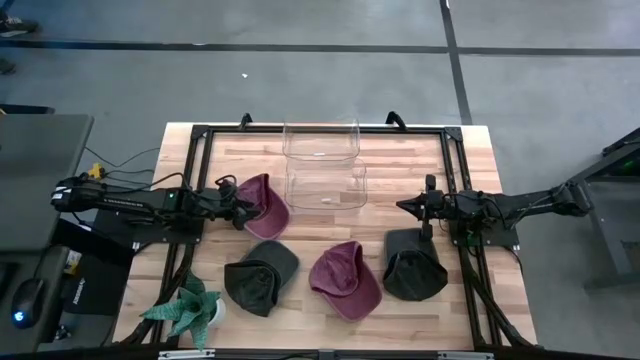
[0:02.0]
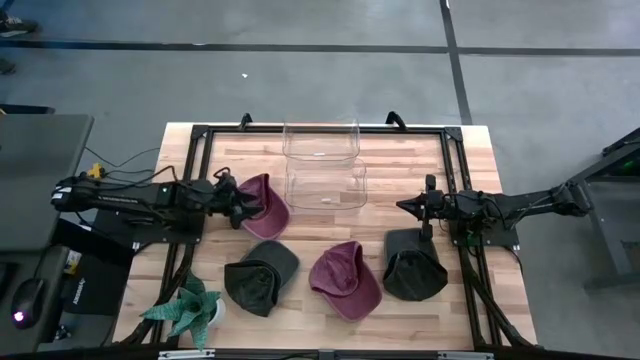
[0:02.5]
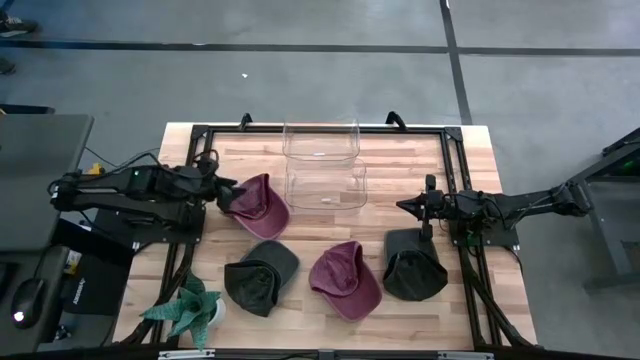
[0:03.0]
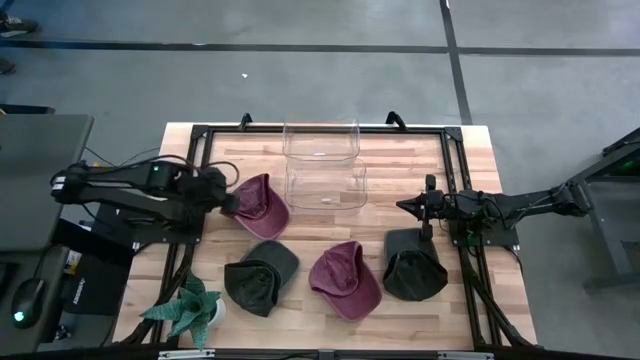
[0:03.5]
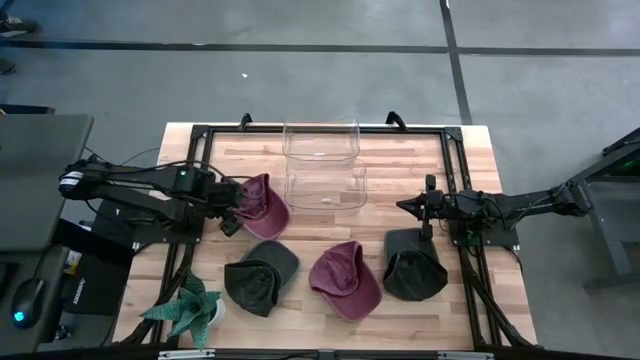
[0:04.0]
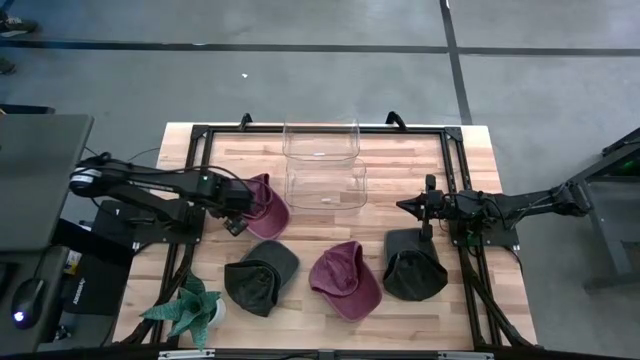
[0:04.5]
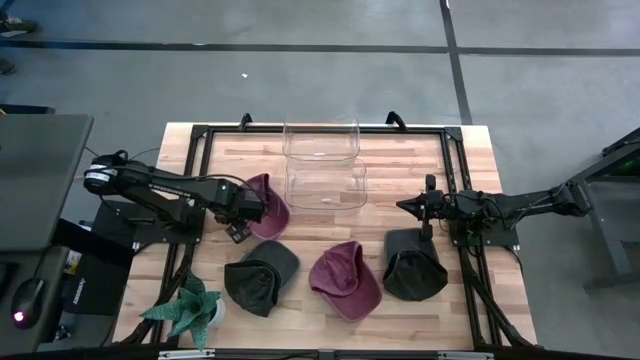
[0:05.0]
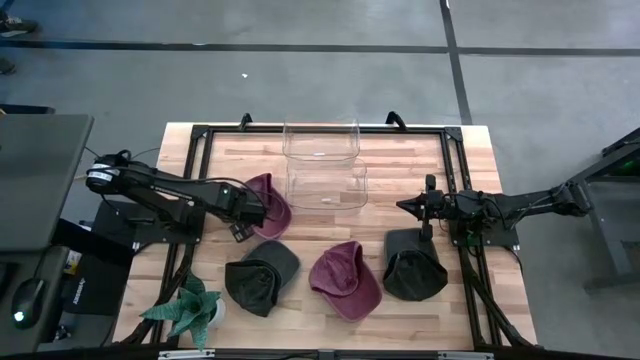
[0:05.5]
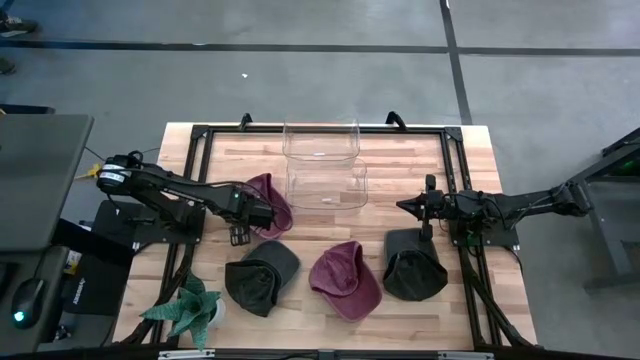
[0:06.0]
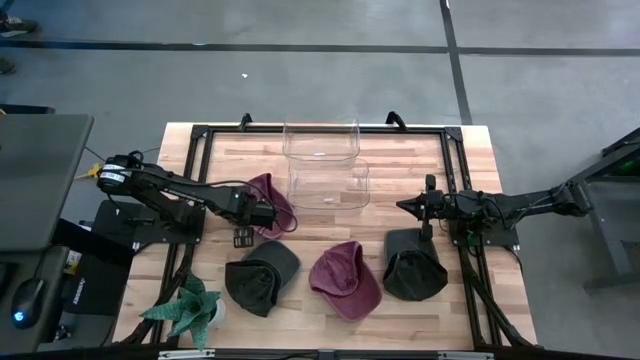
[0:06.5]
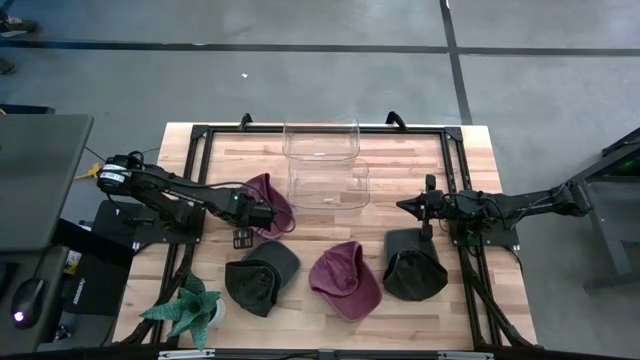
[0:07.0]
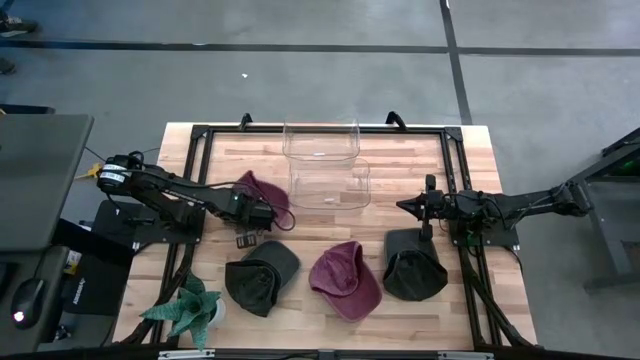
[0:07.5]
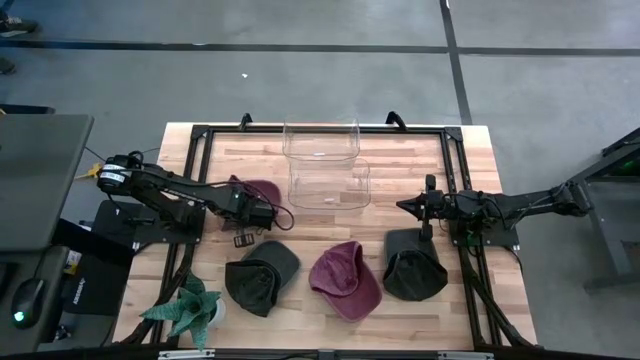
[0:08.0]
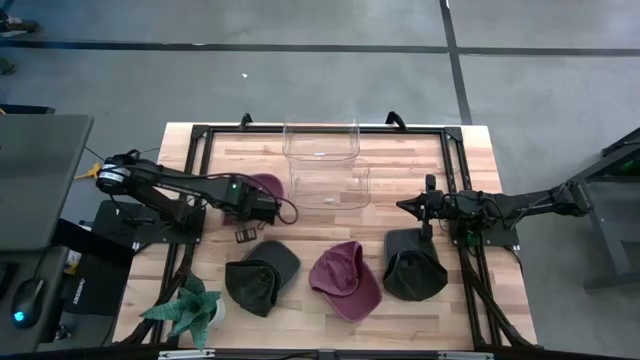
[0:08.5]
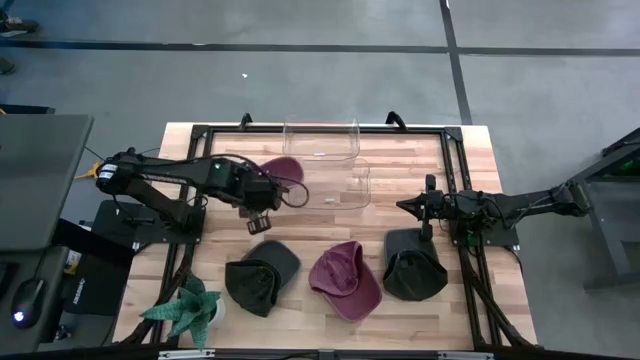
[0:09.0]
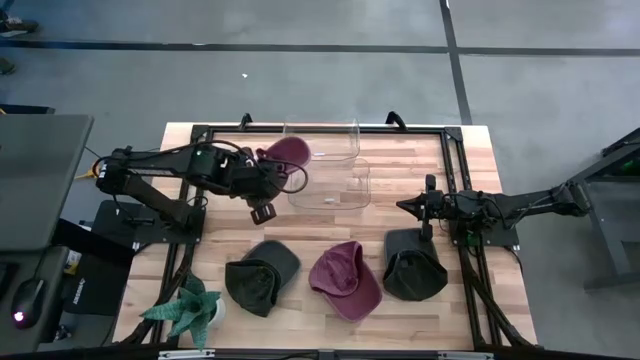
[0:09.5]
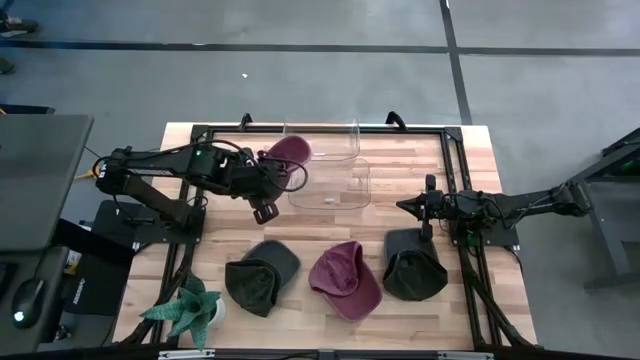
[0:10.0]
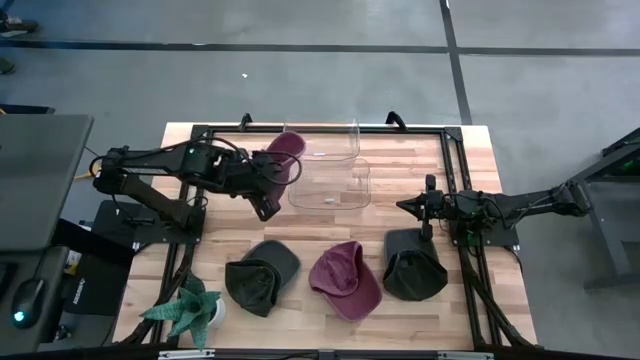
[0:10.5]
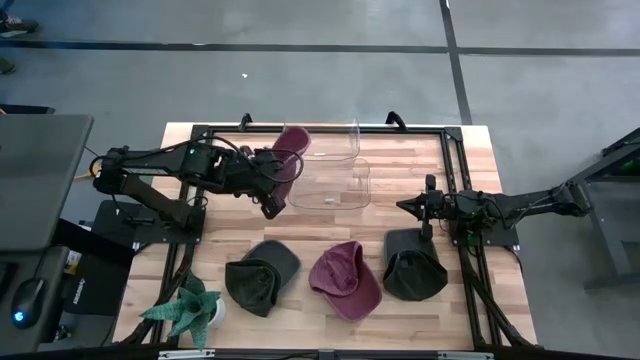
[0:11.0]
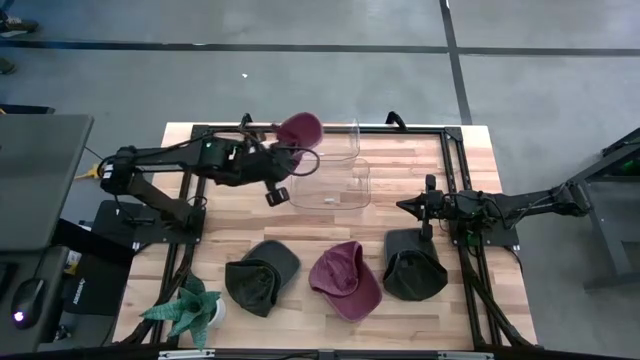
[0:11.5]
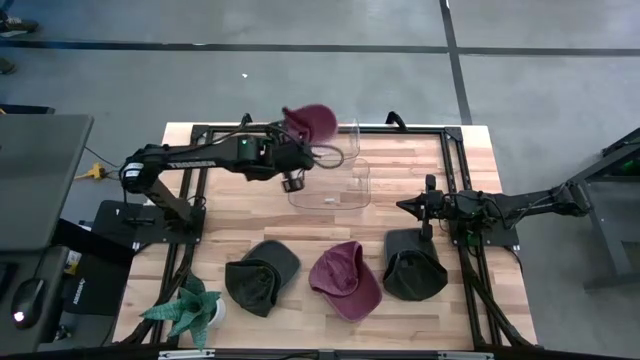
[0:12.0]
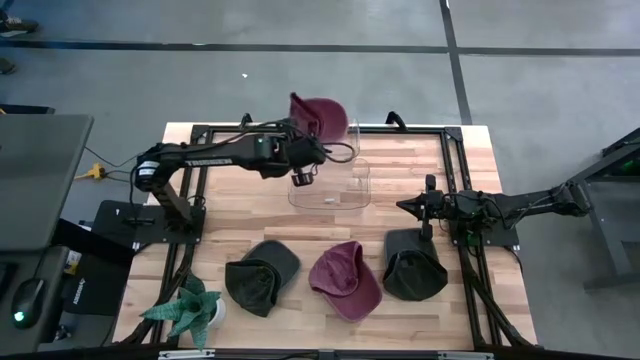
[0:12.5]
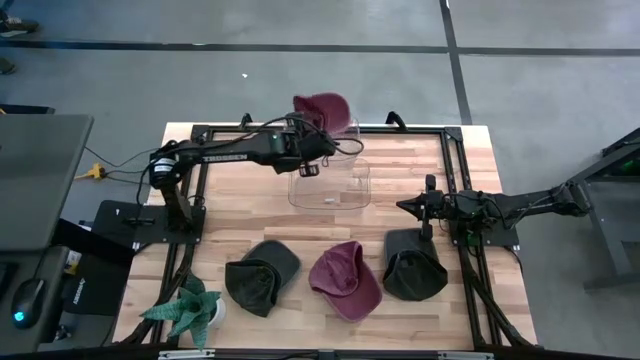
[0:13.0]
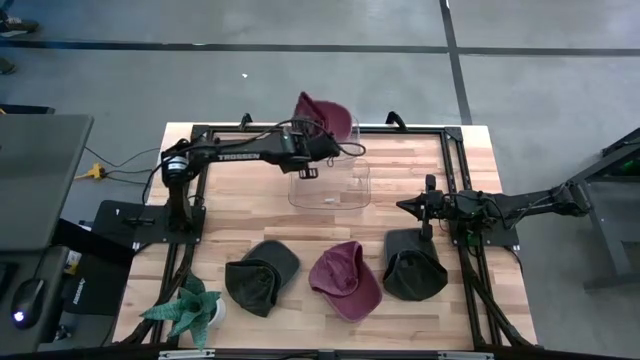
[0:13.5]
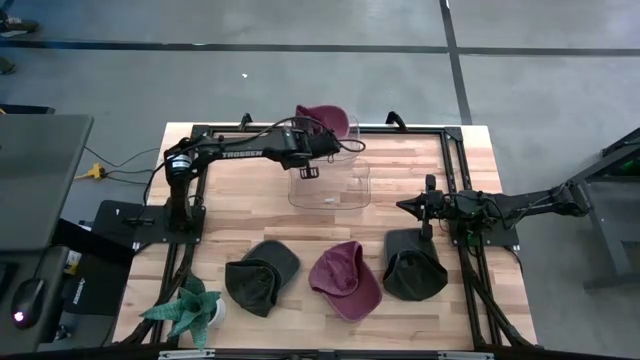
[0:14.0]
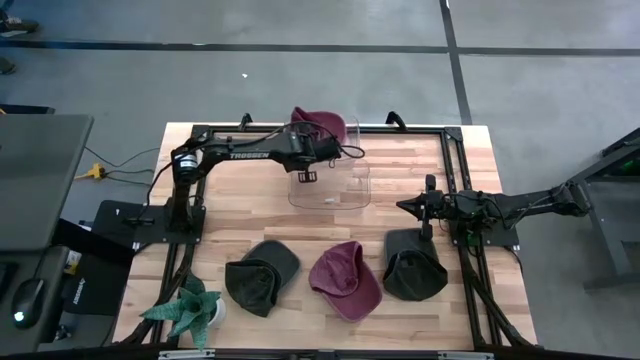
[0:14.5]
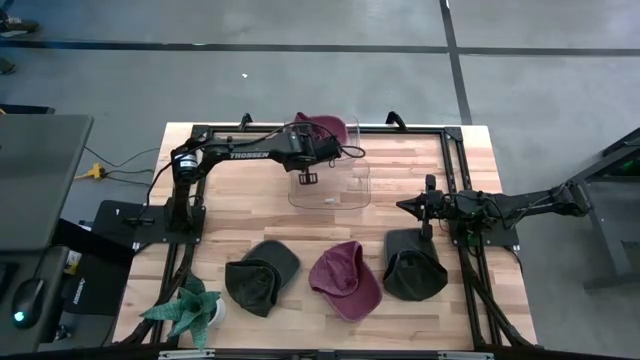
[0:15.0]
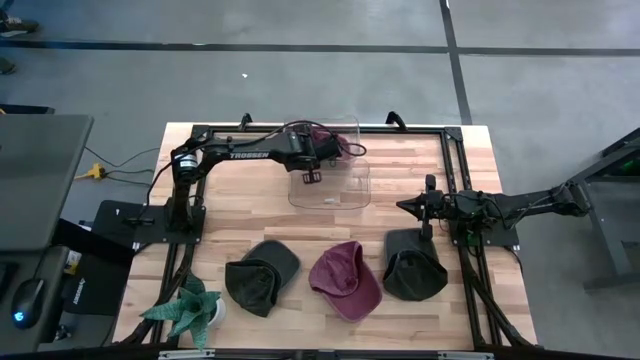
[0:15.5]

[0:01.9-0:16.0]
Task: Pick & Place hat
Put the dark red cap into the top transparent bin

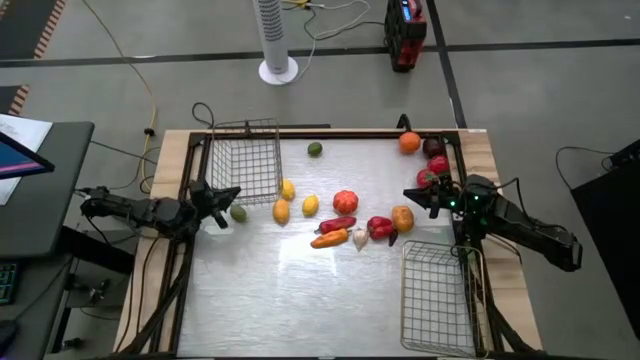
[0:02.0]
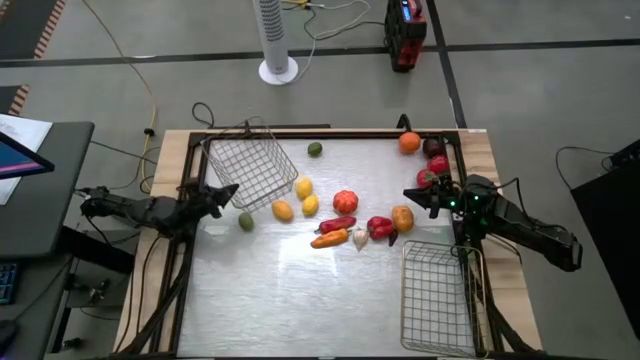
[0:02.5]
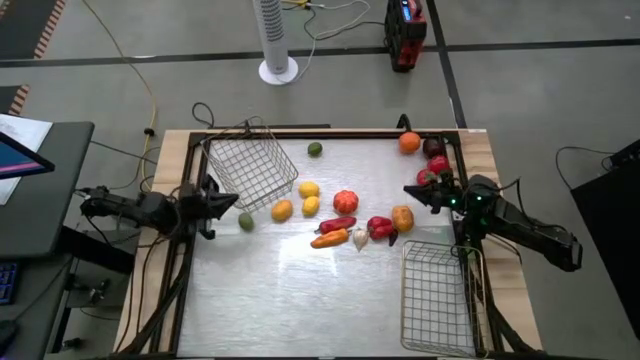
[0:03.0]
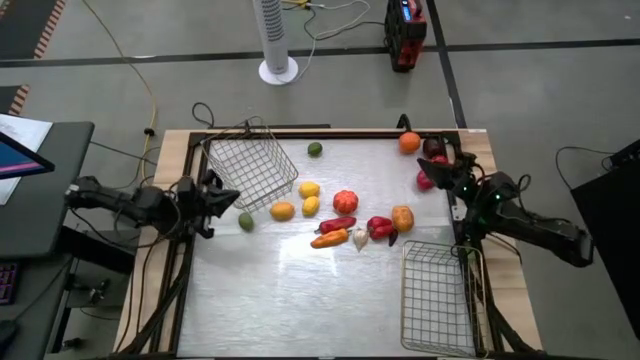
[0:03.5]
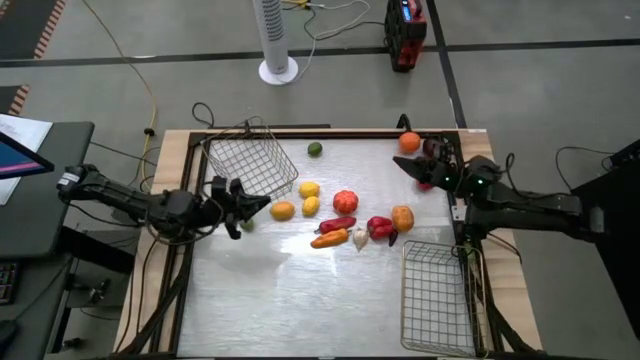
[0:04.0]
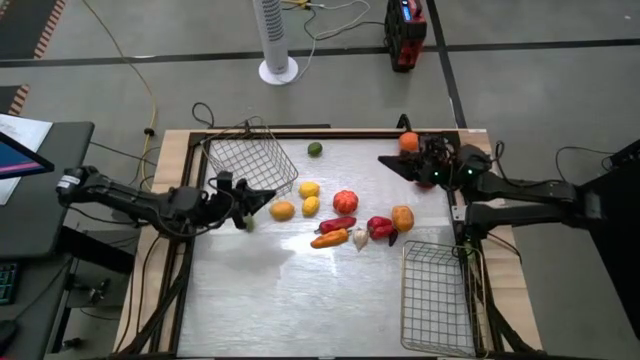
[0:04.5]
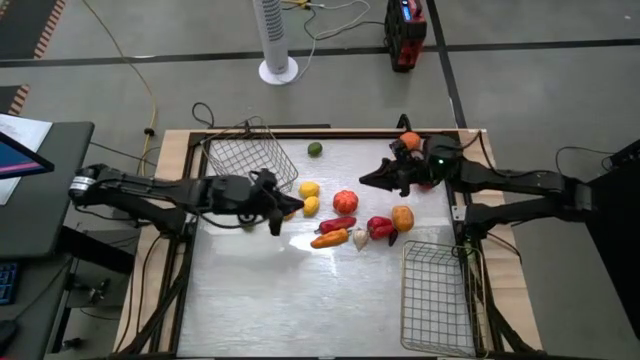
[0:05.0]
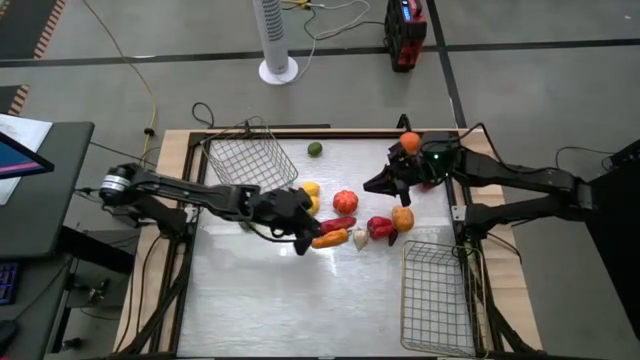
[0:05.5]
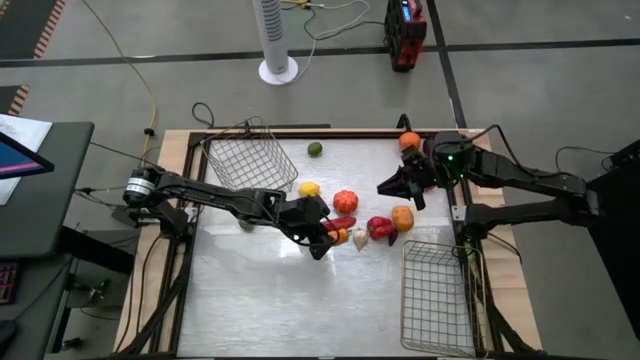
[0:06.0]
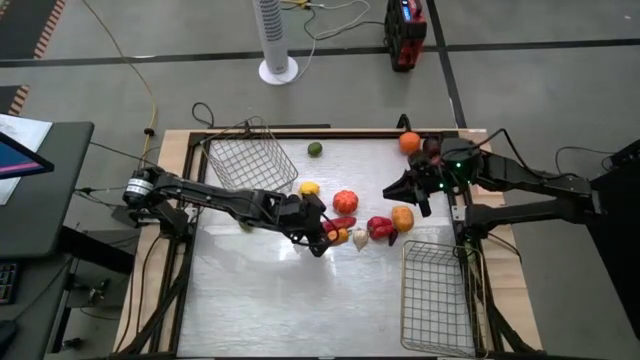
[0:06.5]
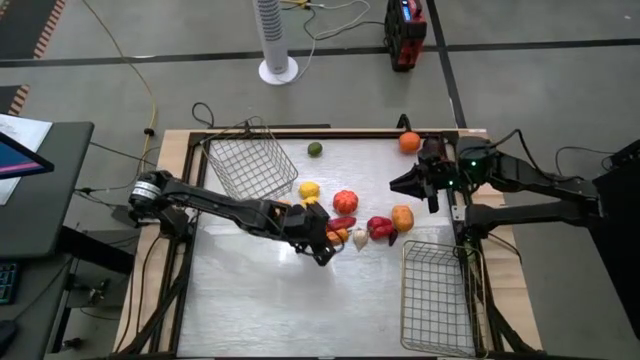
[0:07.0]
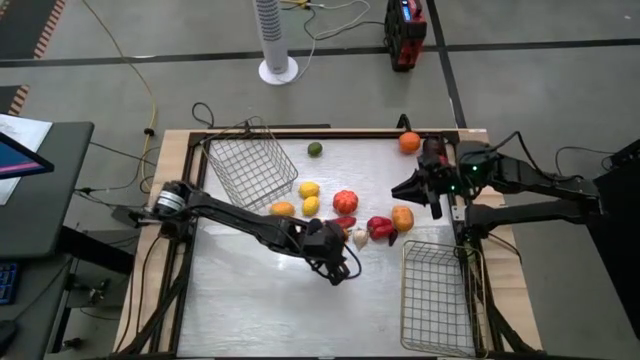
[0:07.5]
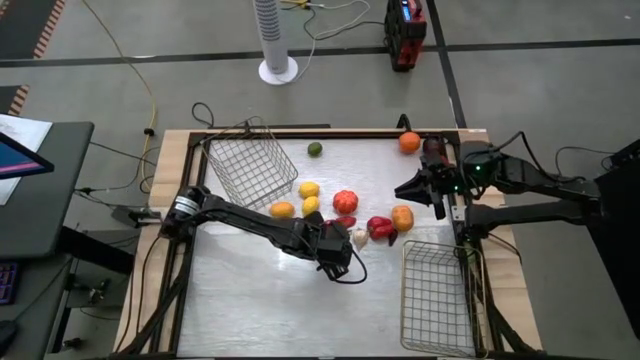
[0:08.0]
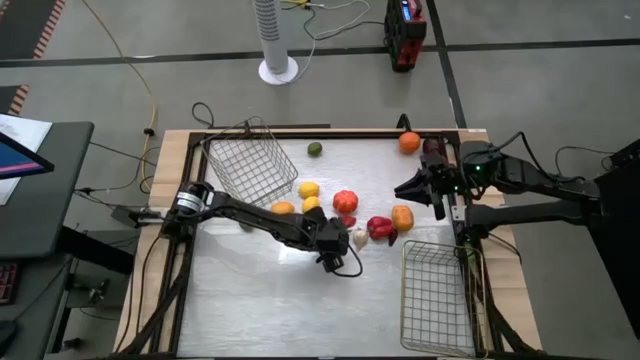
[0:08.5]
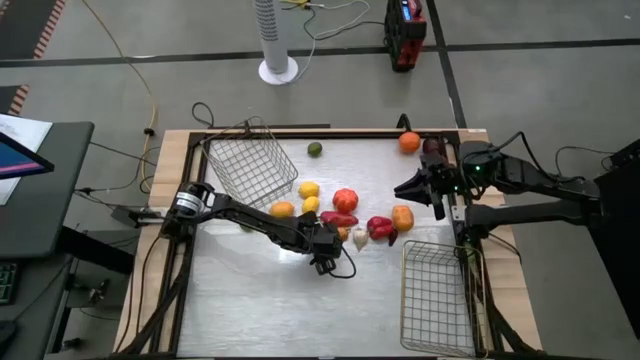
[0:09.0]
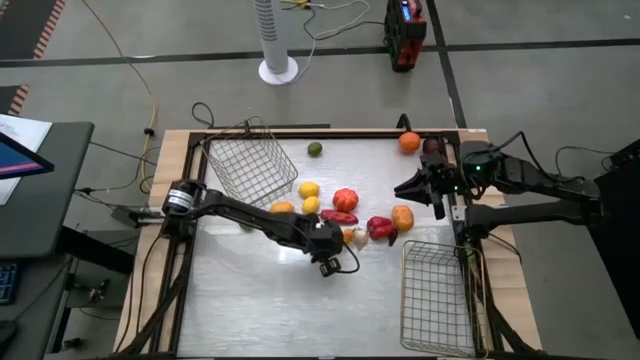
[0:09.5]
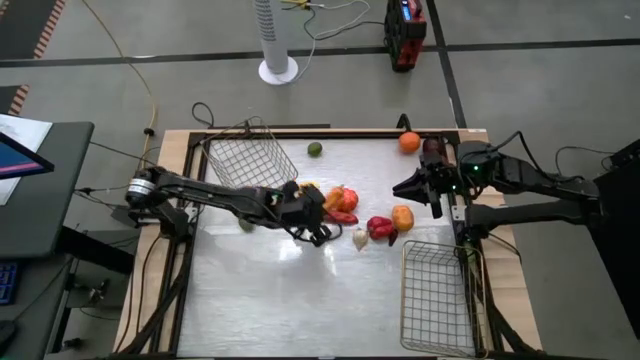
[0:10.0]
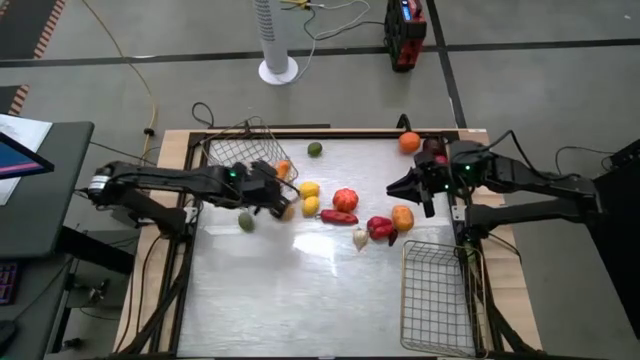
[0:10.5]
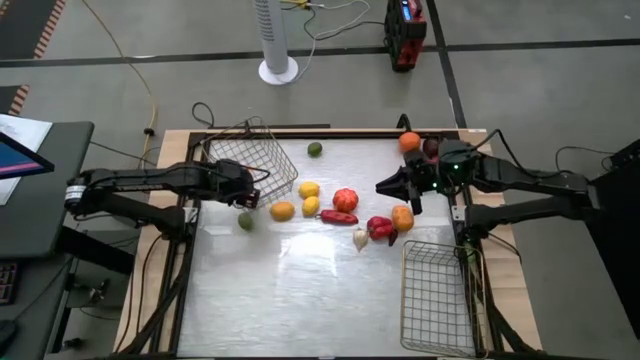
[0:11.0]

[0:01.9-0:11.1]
Task: Sort produce into baskets
Put the orange chili pepper into the top wire basket
